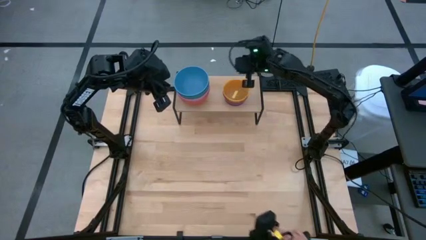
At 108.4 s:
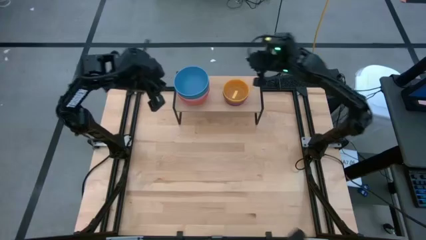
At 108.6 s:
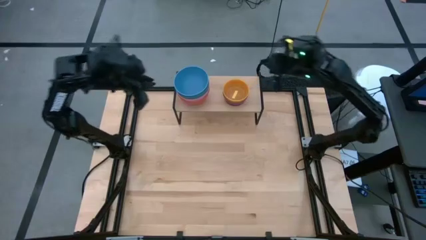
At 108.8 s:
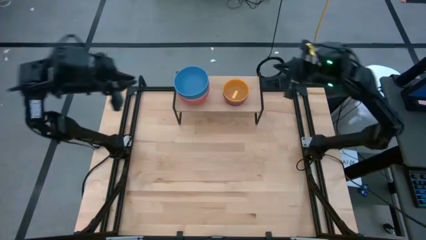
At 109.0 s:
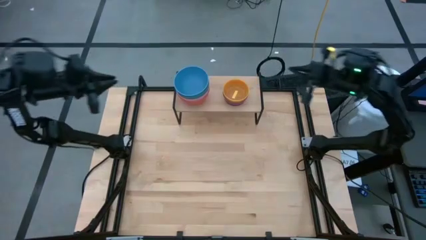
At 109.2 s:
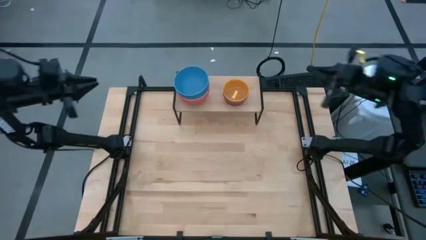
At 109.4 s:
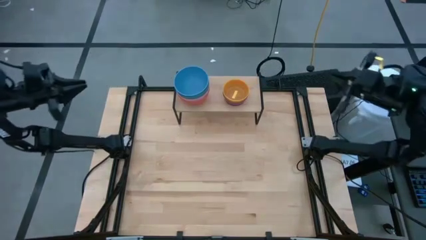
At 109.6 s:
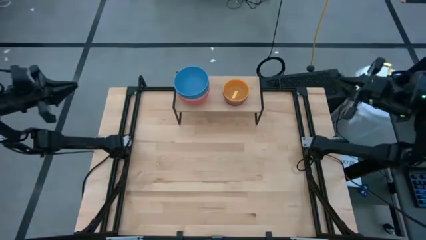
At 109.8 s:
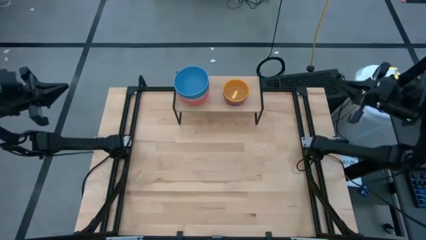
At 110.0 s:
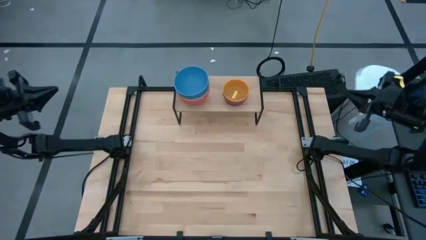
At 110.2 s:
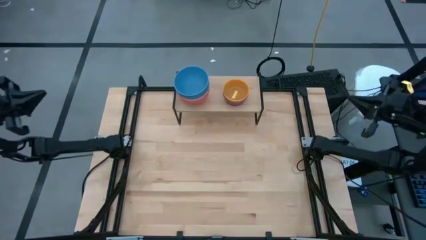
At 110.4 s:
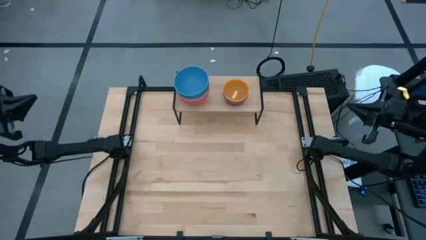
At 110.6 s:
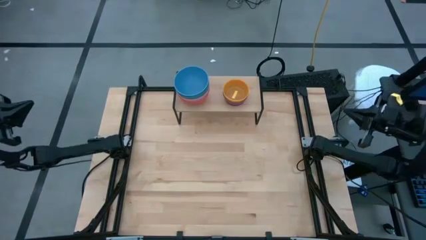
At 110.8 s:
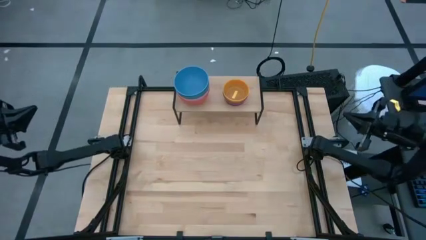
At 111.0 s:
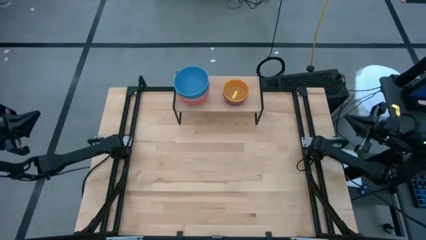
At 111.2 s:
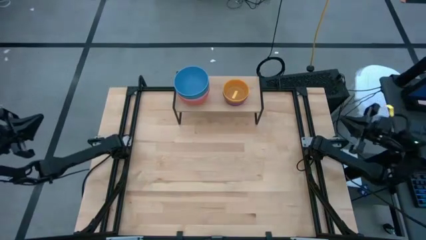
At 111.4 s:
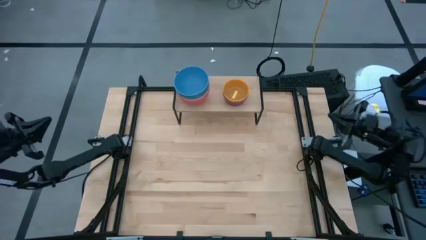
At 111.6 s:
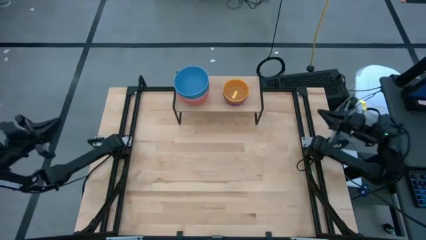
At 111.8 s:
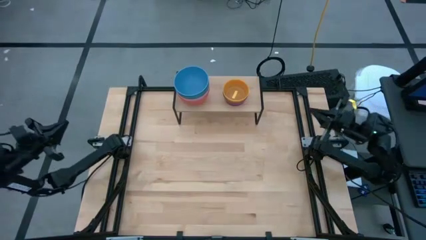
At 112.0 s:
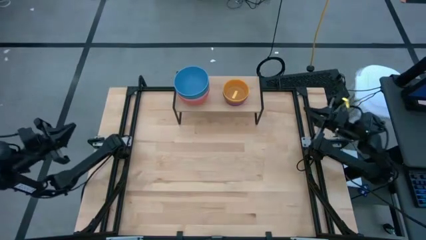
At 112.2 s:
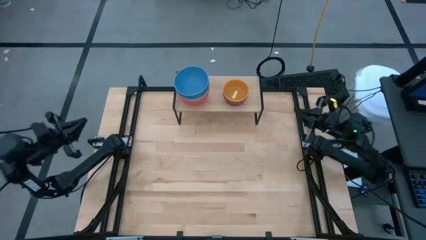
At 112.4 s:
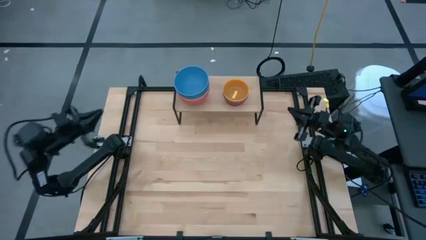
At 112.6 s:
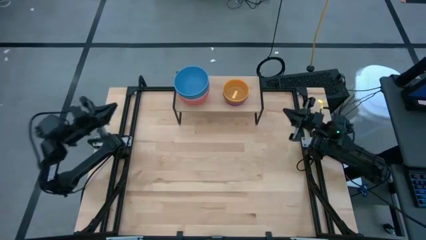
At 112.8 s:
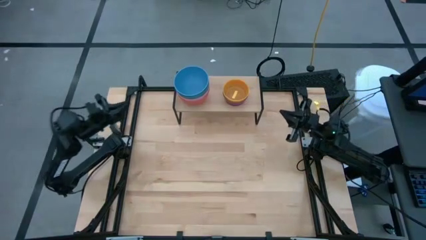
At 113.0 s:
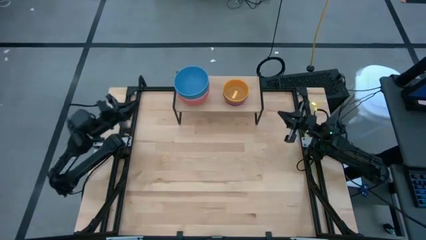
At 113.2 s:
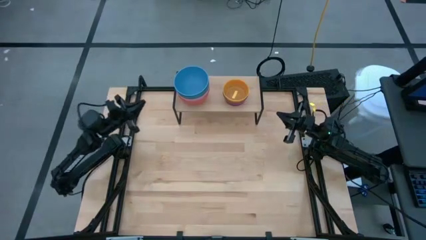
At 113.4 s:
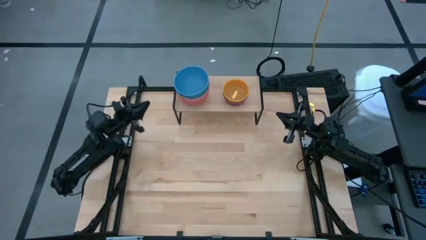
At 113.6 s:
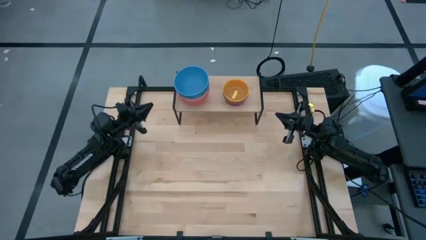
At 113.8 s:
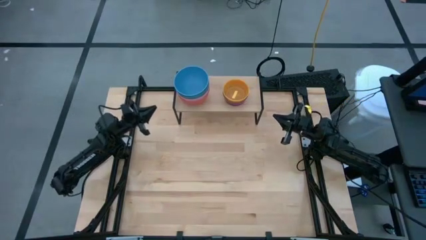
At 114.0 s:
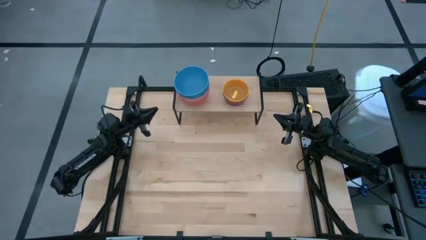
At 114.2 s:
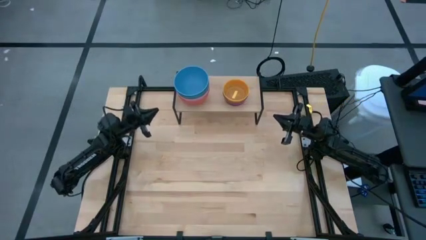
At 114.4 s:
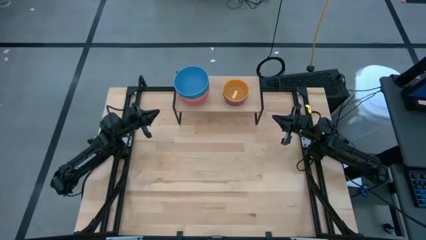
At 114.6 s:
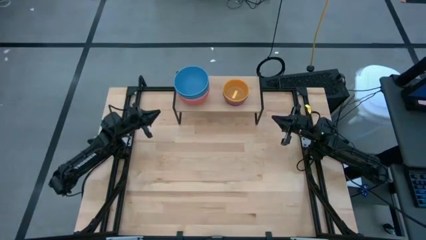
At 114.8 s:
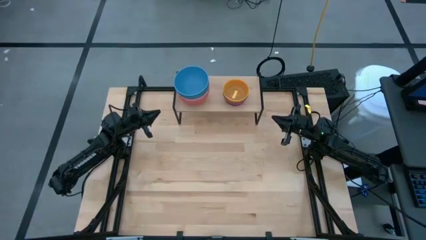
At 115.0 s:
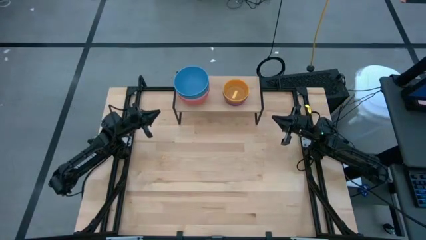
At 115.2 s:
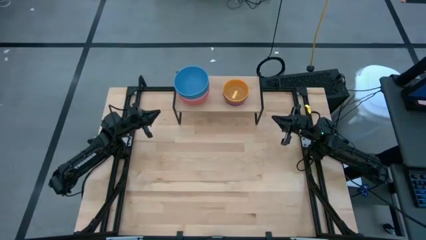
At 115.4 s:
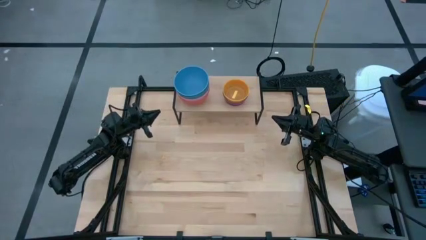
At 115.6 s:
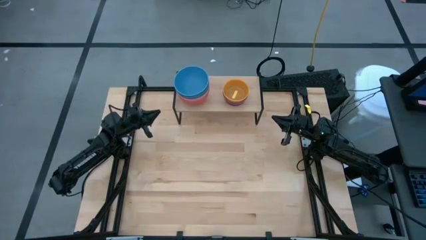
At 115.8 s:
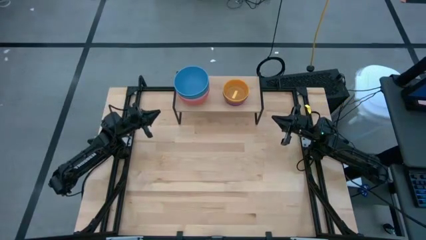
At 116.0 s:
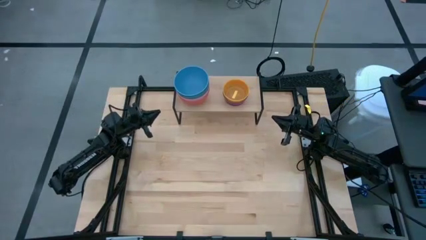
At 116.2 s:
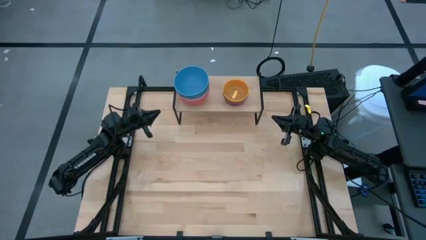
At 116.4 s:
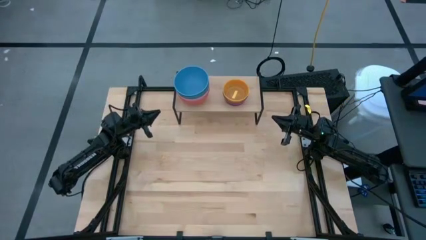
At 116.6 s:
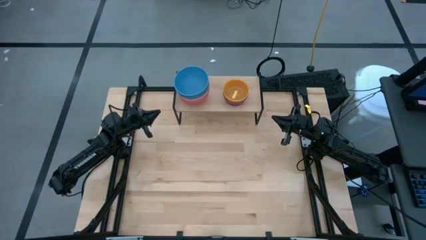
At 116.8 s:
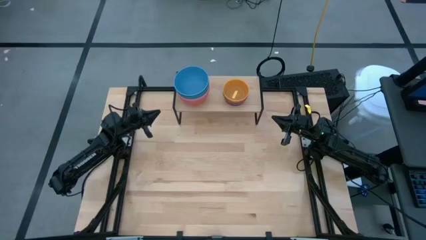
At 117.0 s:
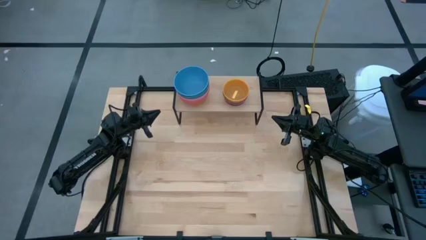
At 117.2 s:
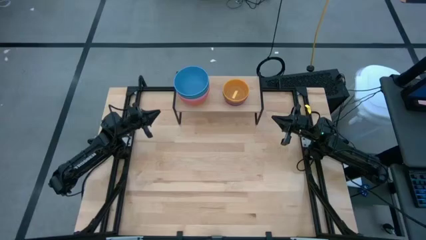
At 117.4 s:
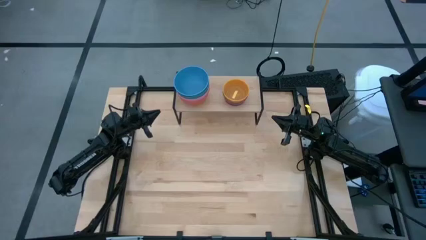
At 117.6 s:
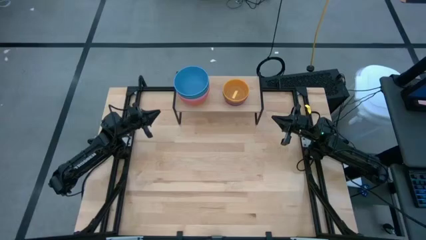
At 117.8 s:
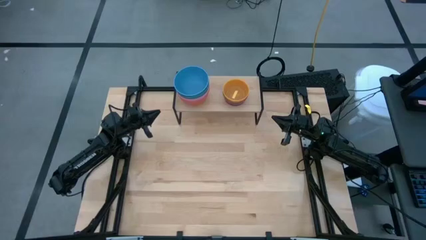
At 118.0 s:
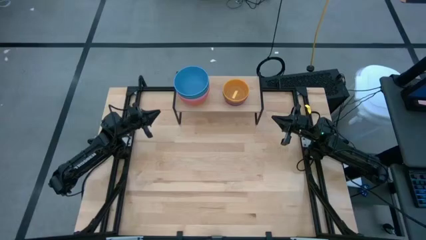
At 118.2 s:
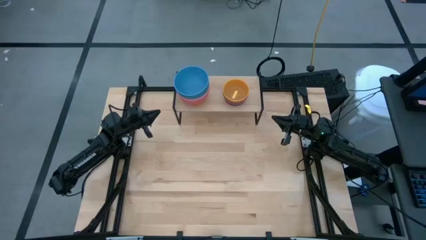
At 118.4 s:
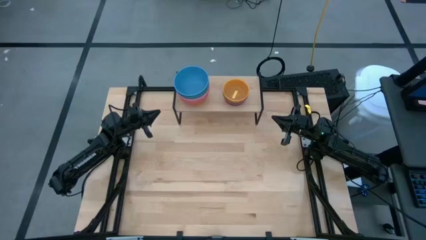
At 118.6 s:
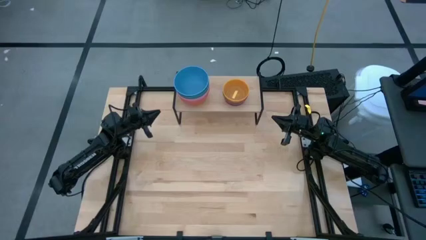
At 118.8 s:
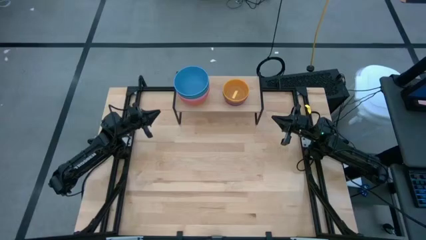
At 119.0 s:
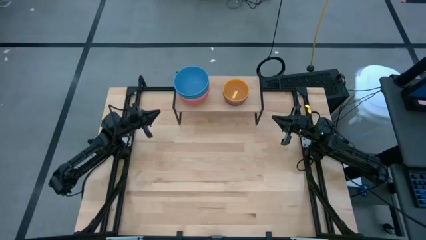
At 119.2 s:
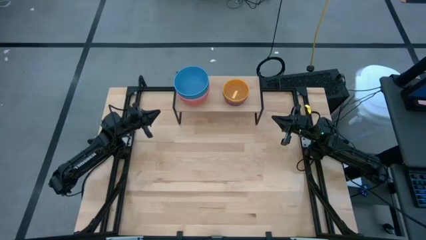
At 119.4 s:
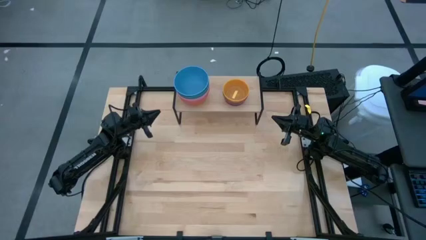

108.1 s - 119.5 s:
Task: Place and stack bowls onto a shelf
Return to Home Position

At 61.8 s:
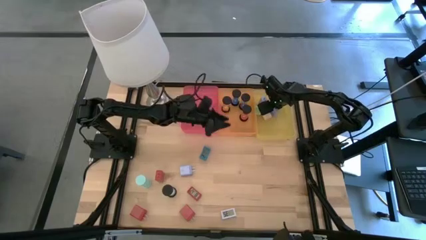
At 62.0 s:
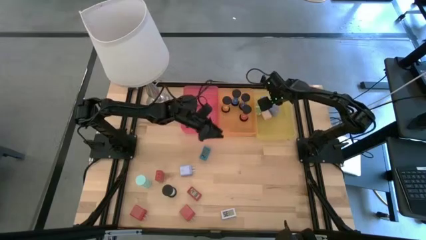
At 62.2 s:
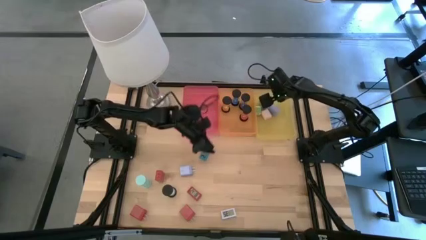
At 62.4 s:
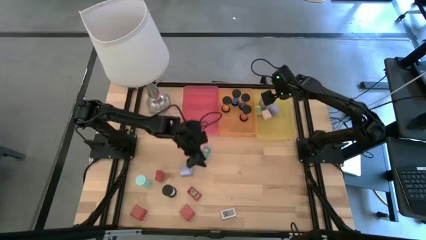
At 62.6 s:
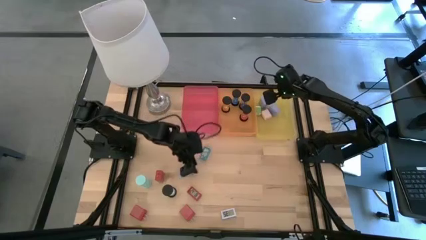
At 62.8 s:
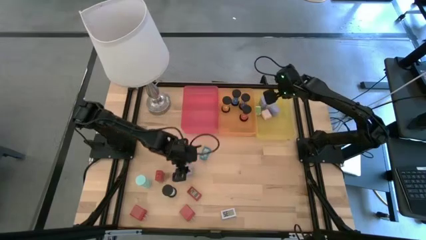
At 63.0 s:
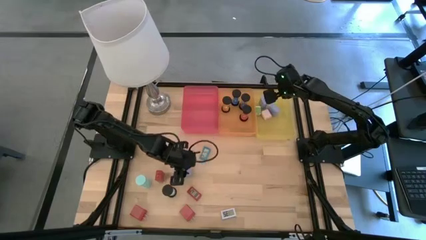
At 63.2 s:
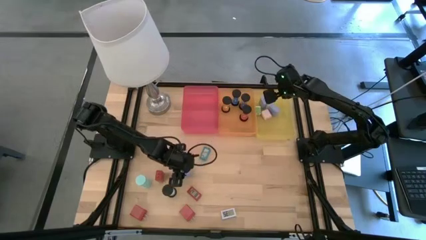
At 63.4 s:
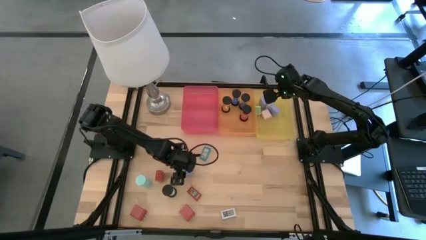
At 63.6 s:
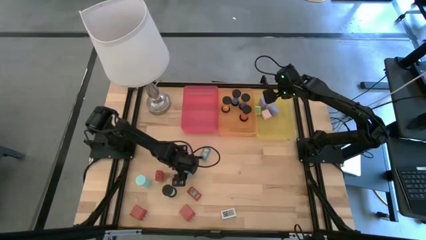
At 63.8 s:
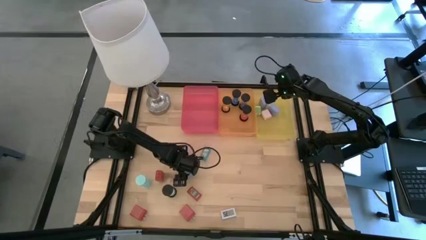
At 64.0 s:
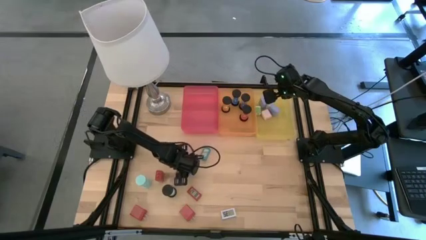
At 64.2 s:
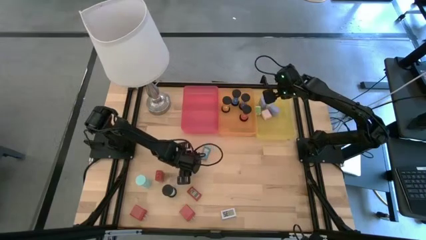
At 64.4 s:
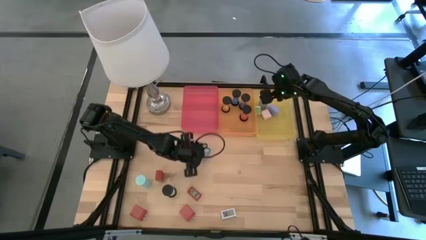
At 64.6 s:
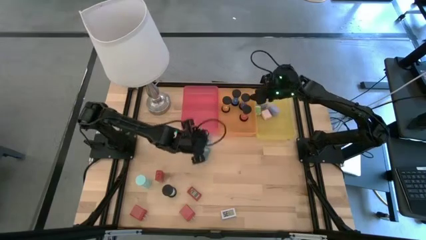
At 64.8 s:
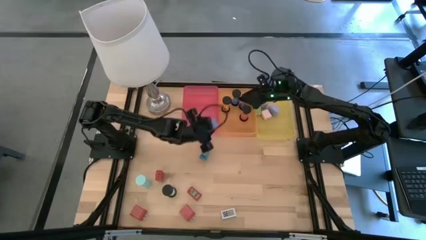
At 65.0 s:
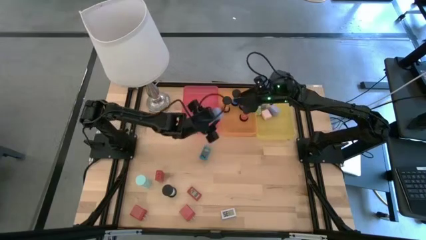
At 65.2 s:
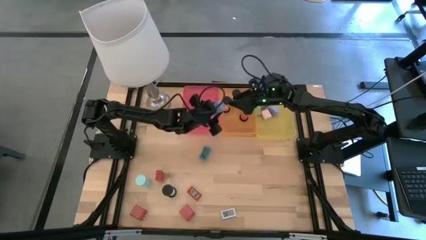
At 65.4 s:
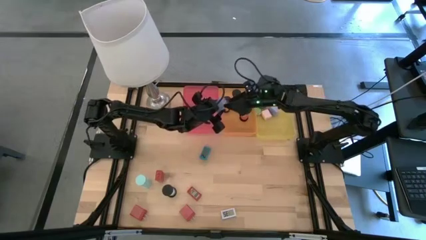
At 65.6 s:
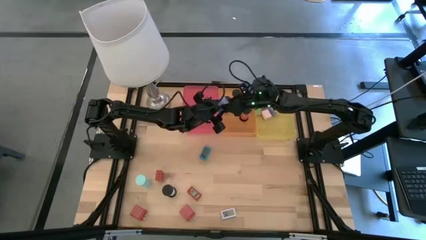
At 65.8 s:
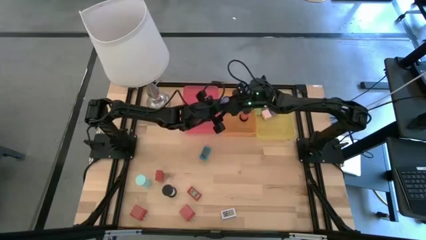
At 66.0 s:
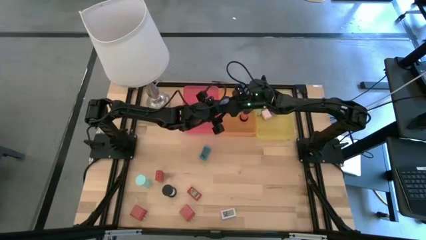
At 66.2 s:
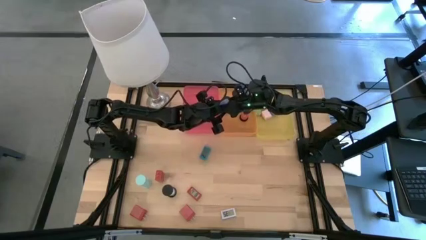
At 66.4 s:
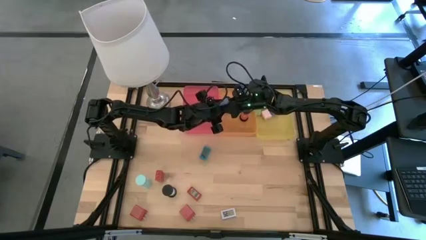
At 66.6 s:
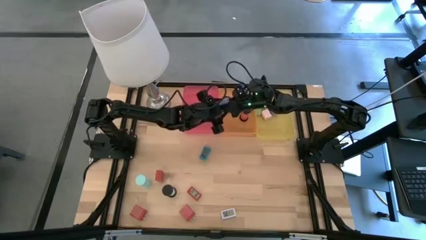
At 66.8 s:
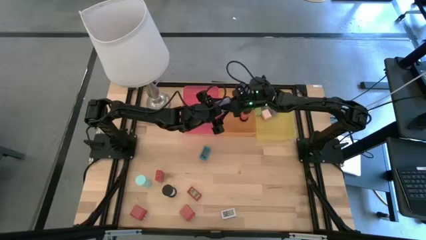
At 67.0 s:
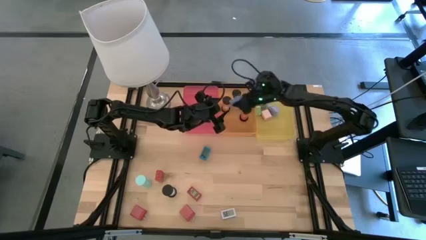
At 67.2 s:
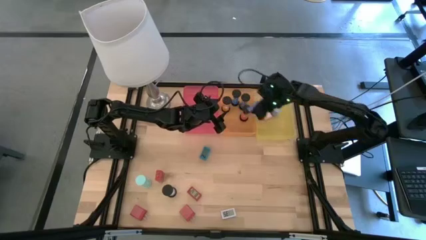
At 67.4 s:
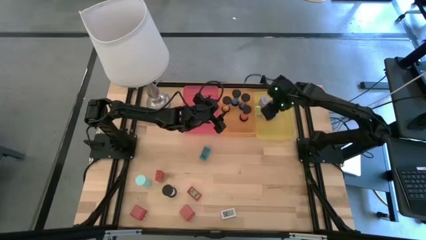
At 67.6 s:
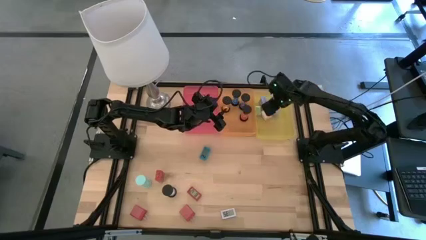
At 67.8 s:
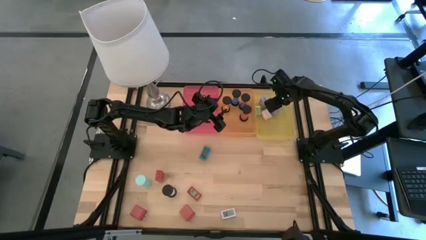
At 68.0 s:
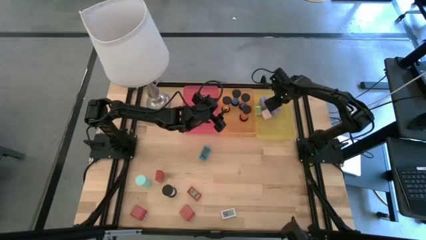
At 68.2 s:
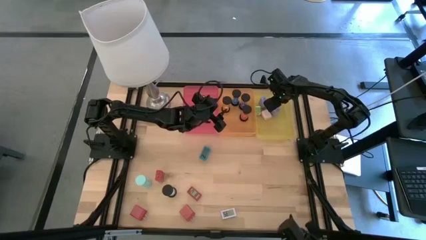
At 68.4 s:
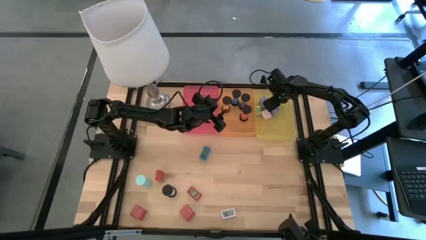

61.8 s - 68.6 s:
Task: Pick & Place Office items
Put the blue charger adapter into the yellow bin
